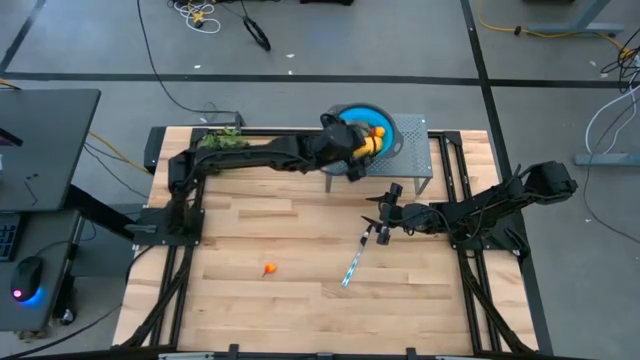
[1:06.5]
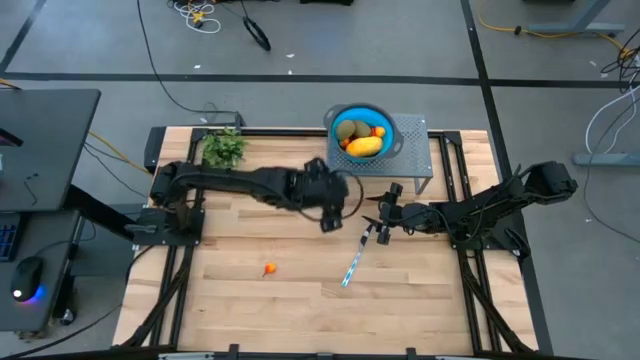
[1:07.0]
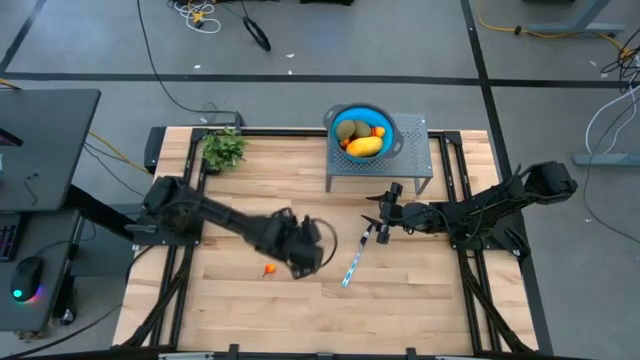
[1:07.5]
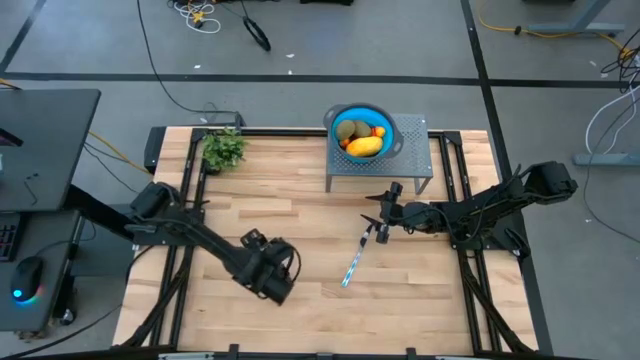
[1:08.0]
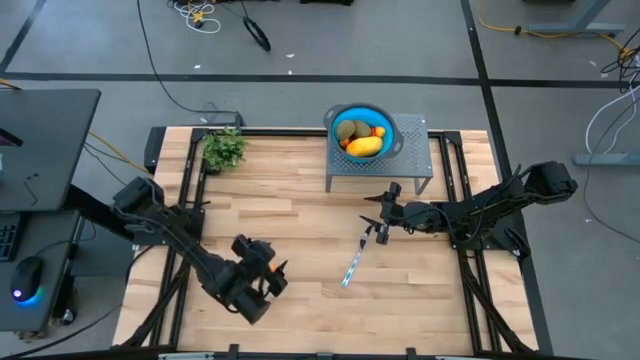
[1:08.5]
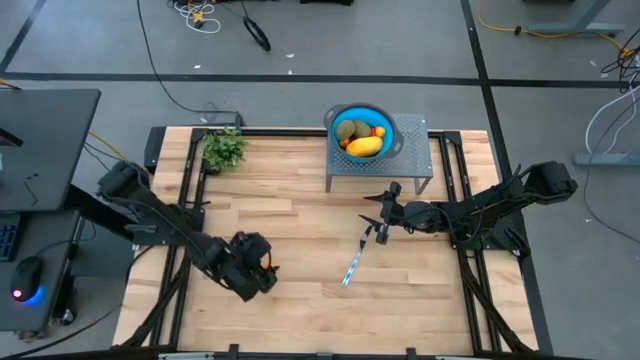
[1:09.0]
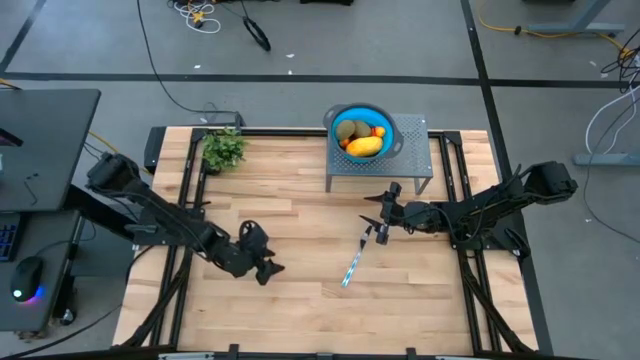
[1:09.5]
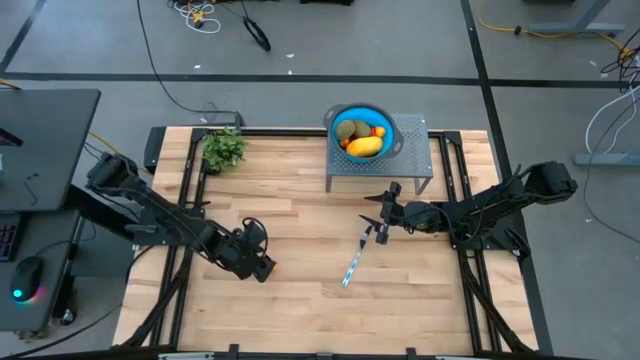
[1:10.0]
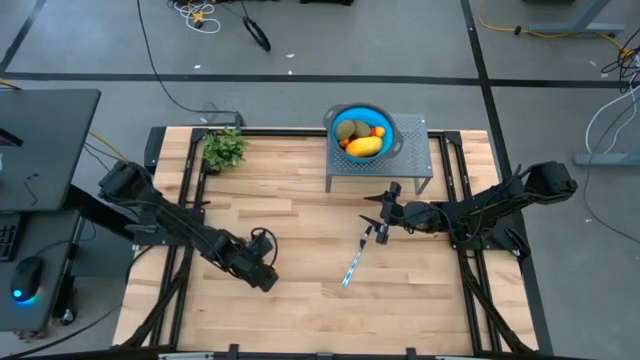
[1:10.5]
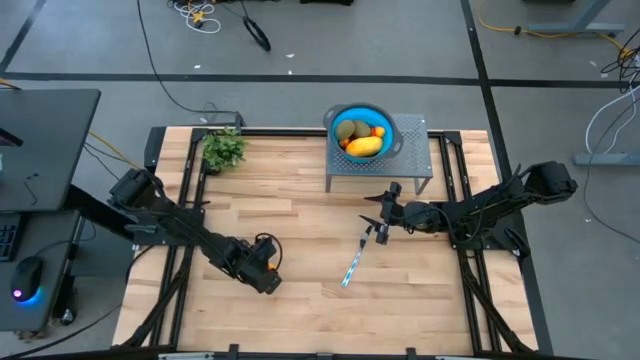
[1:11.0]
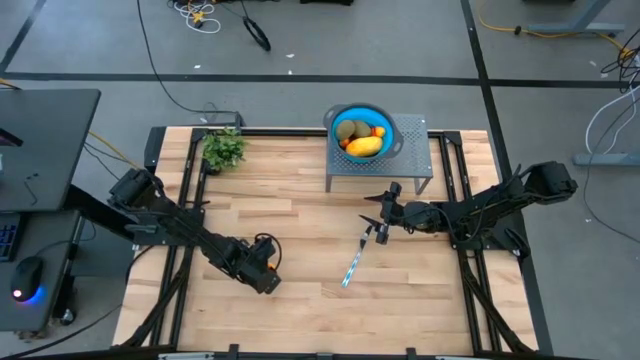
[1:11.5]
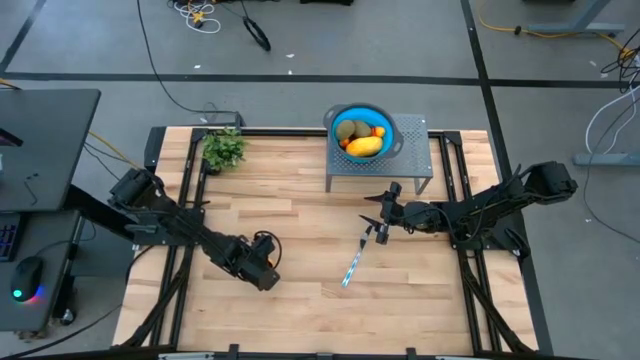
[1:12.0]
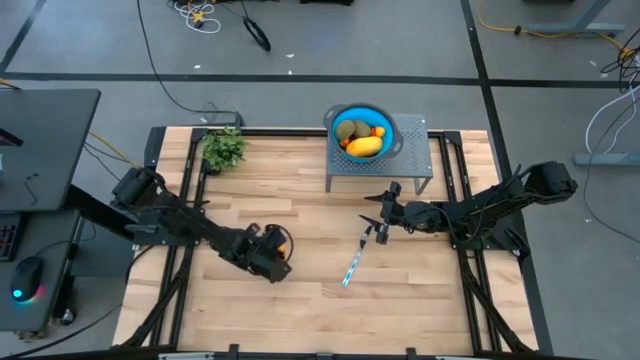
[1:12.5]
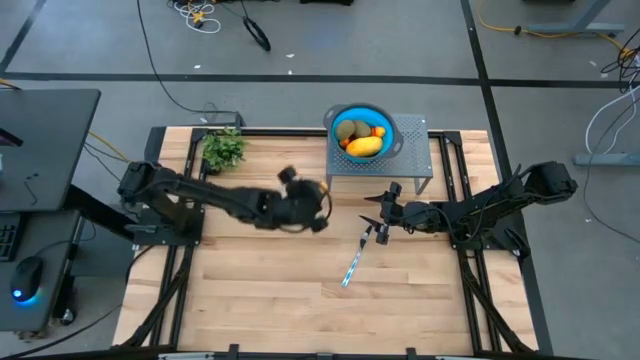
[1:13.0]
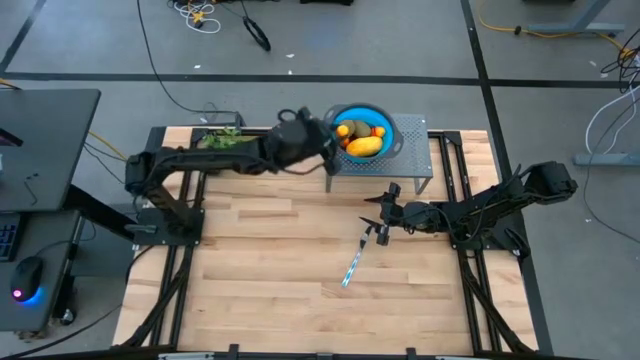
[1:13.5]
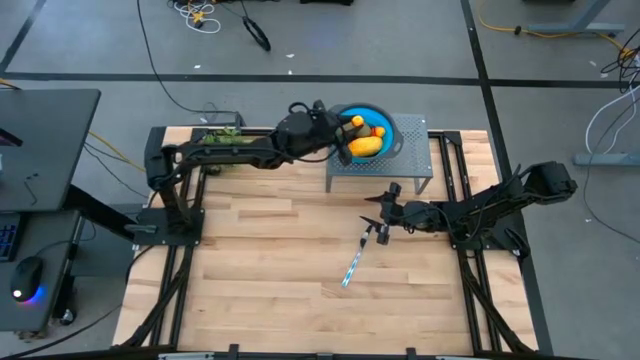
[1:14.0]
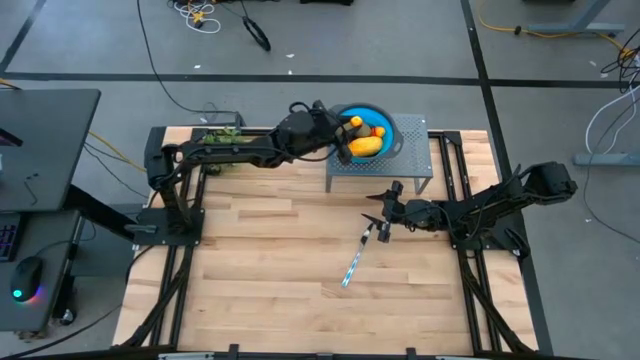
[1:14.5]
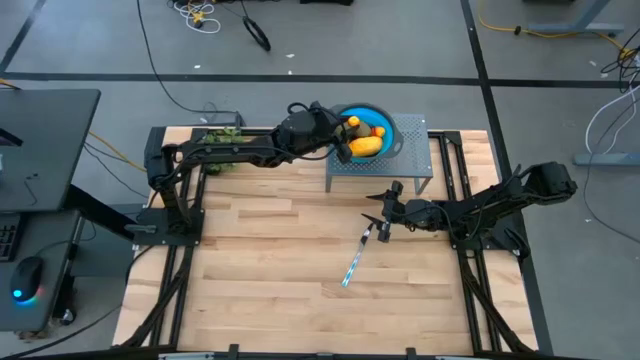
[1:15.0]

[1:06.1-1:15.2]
Task: Pick & Place Fruit
Put the peach into the blue strainer bowl on the shelf

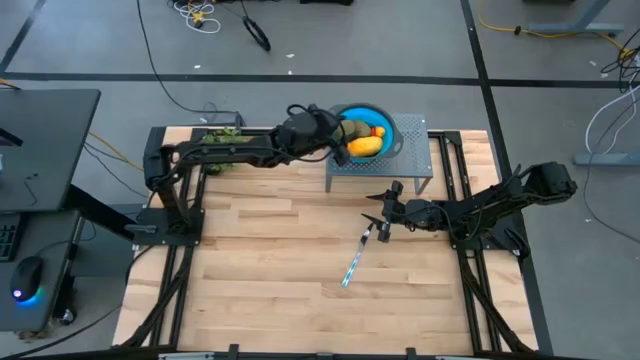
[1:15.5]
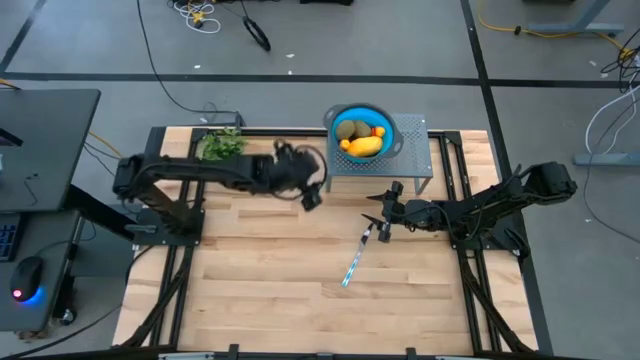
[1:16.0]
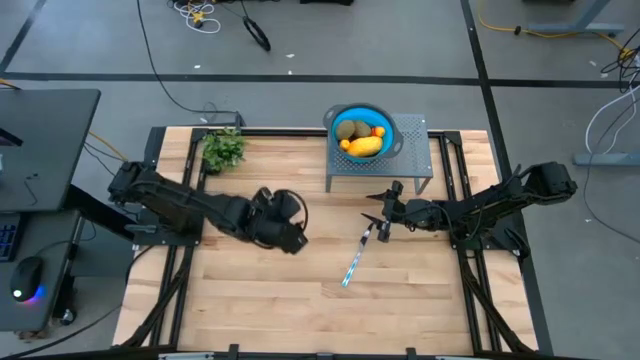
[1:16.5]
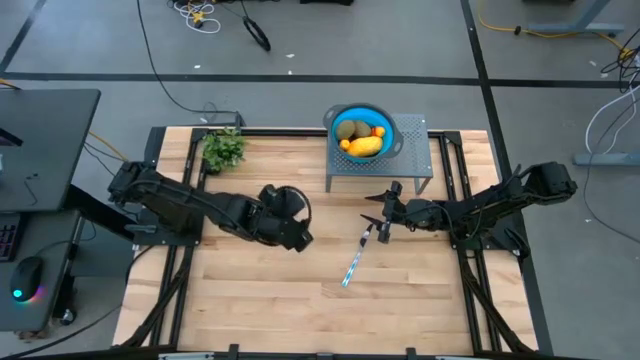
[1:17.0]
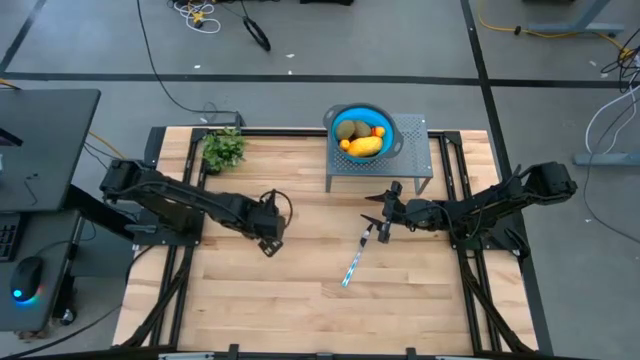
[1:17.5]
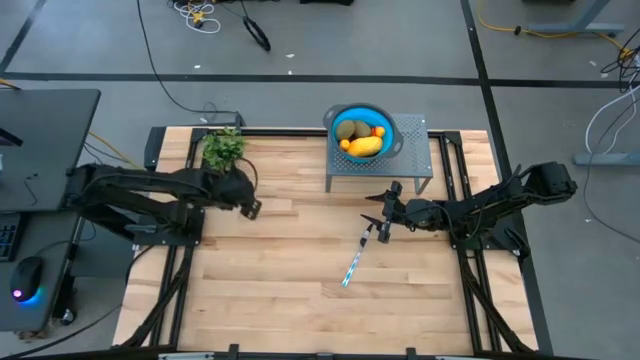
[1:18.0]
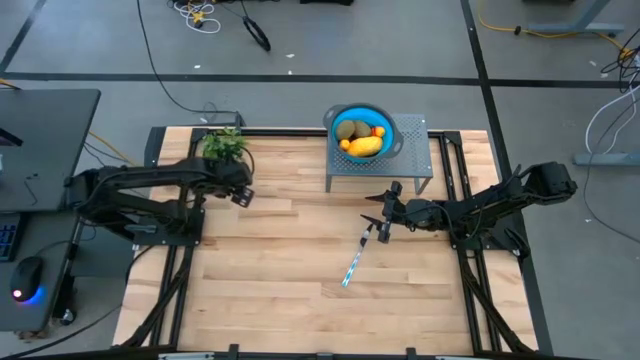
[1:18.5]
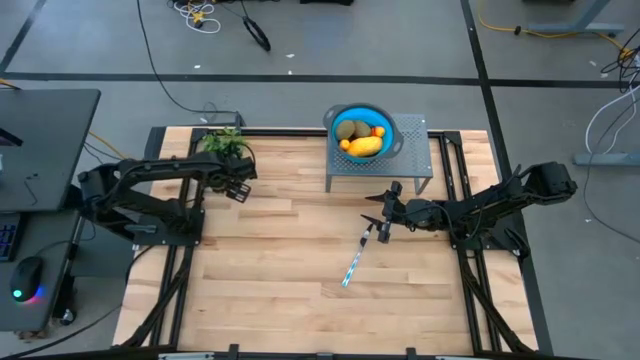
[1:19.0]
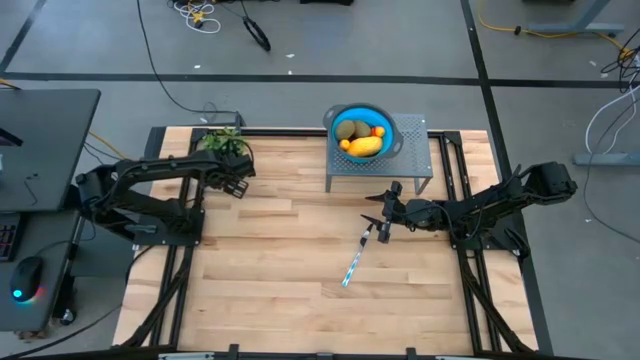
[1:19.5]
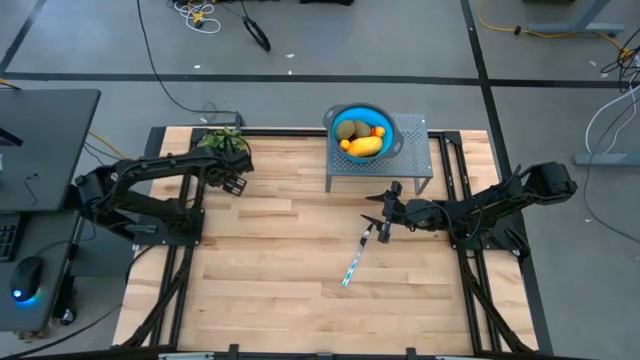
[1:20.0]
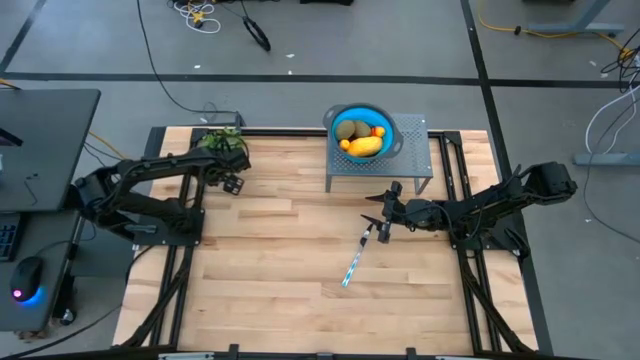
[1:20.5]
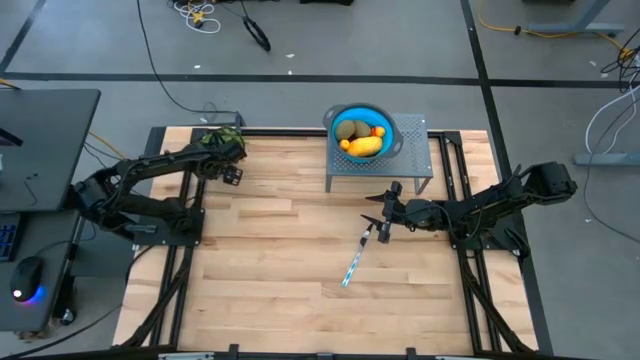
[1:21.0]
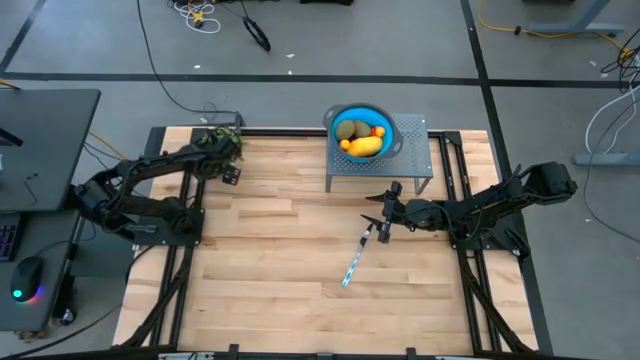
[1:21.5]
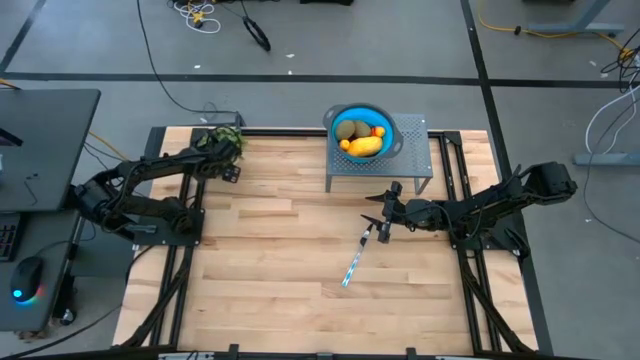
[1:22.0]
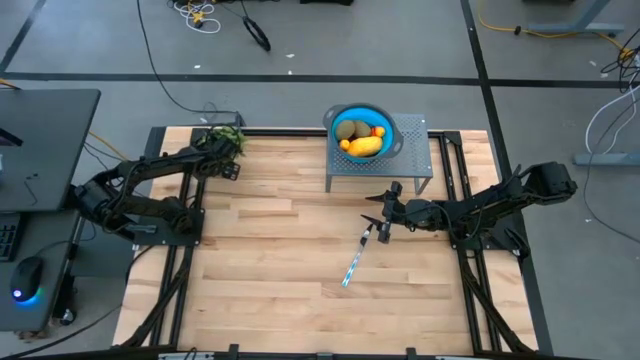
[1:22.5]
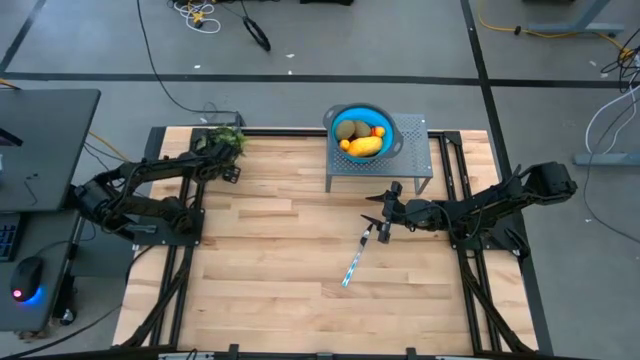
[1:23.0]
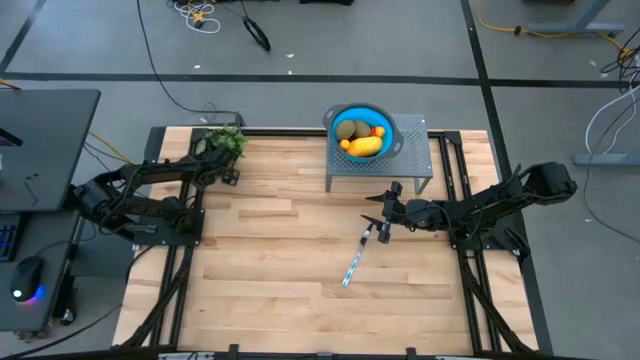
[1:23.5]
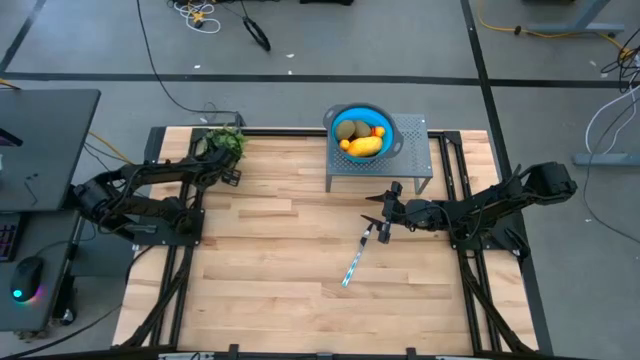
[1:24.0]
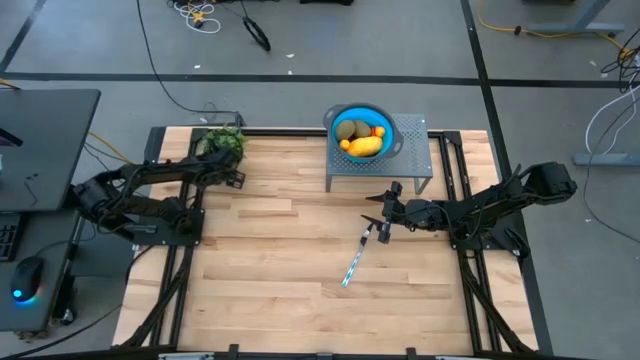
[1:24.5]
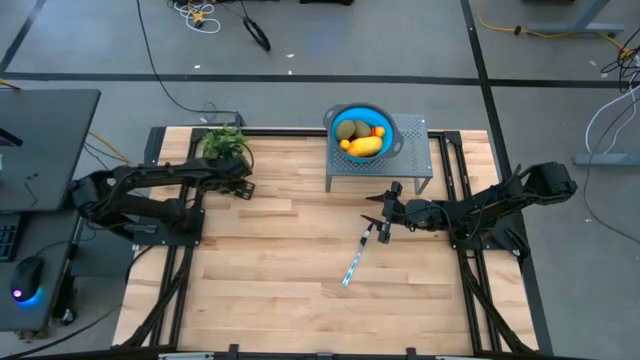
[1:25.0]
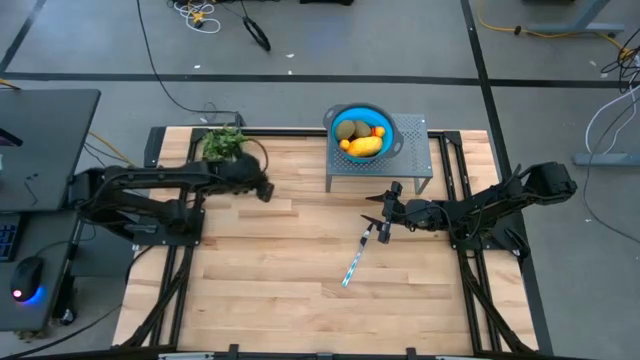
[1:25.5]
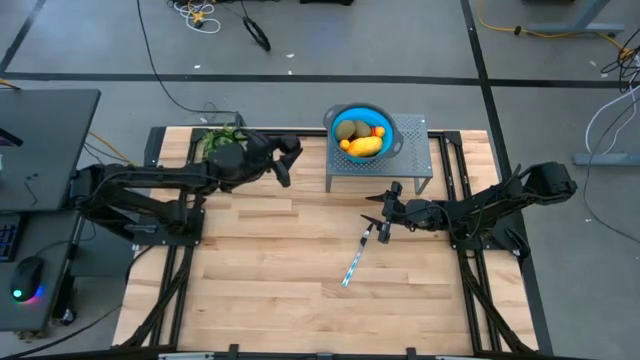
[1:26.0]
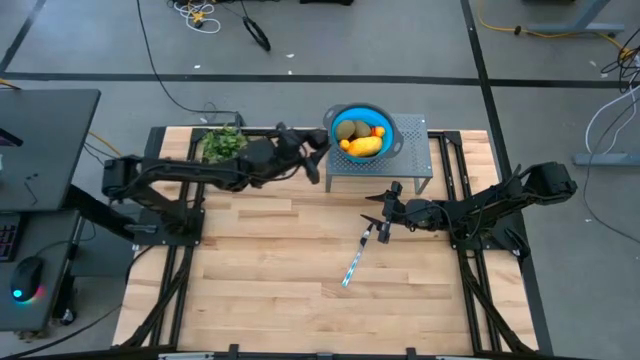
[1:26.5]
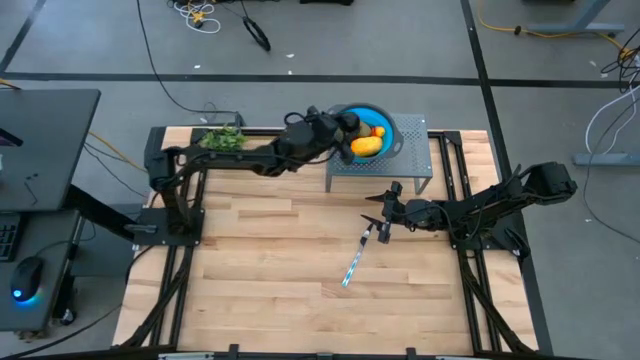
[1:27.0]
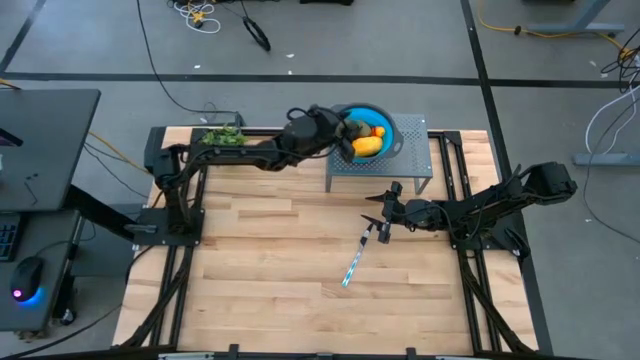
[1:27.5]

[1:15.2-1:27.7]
Put the plum into the blue strainer bowl on the shelf

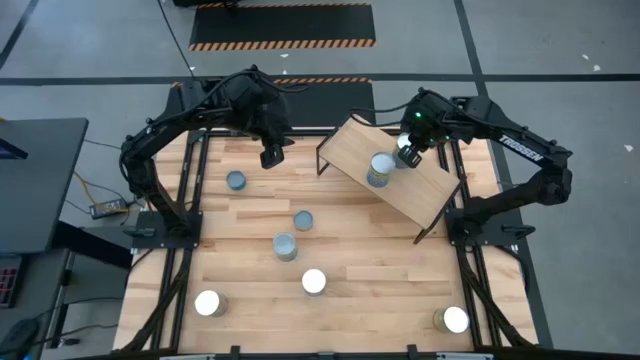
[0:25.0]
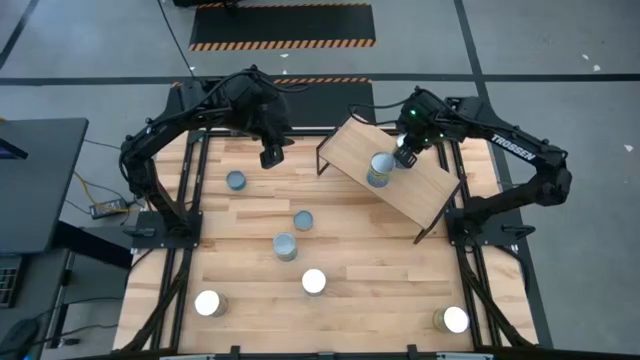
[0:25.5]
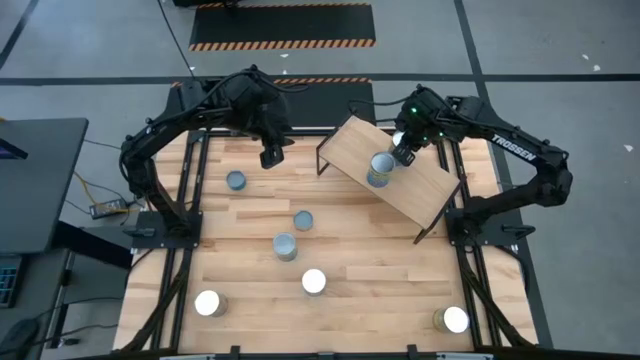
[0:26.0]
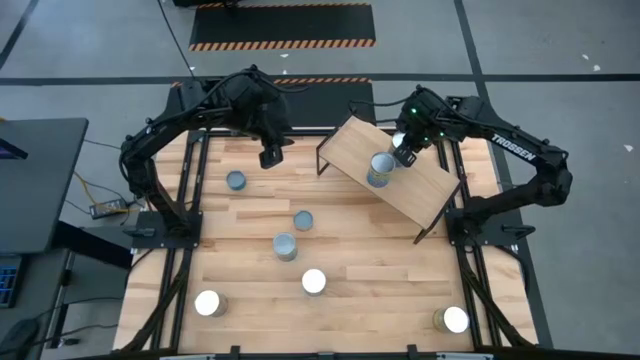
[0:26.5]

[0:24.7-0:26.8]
Task: Pick and place cans onto a shelf
Adjust the canned cherries on the shelf
